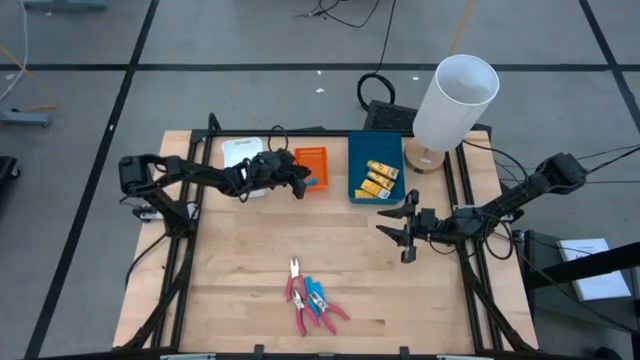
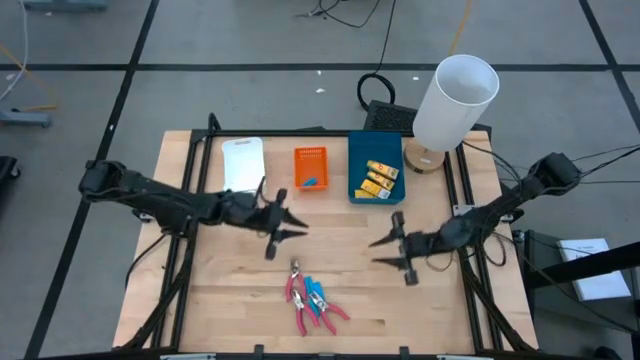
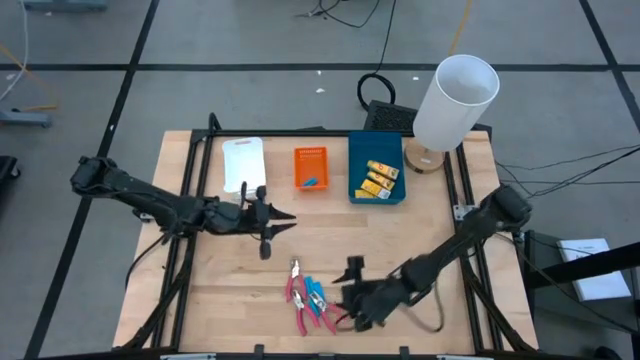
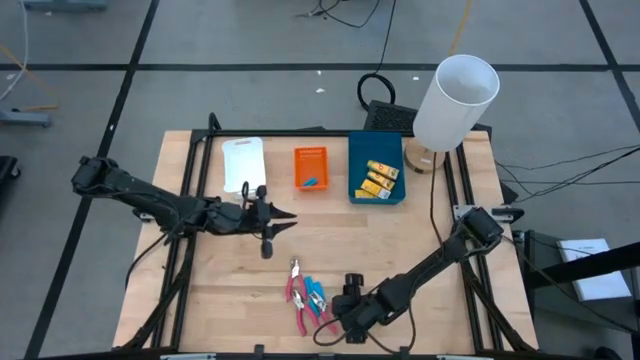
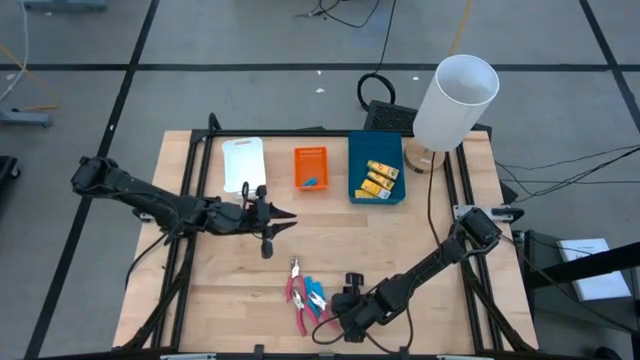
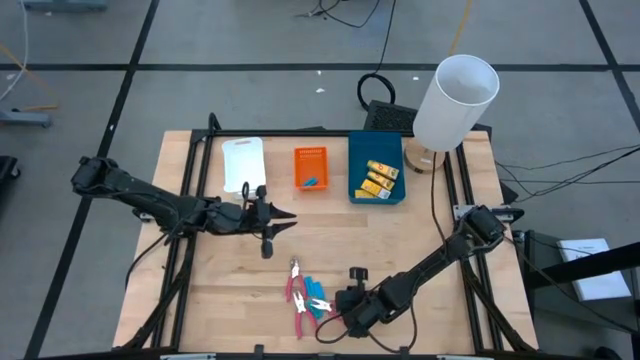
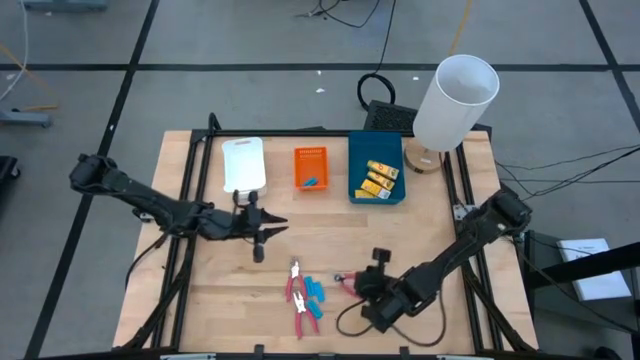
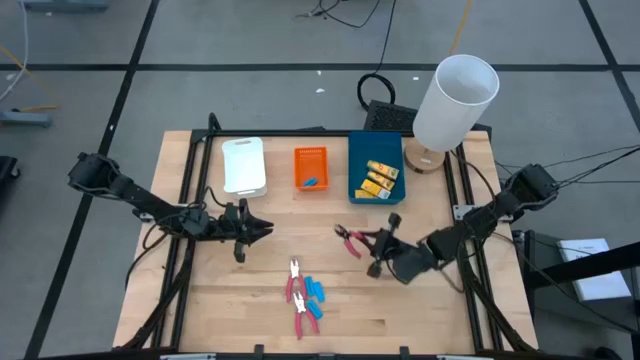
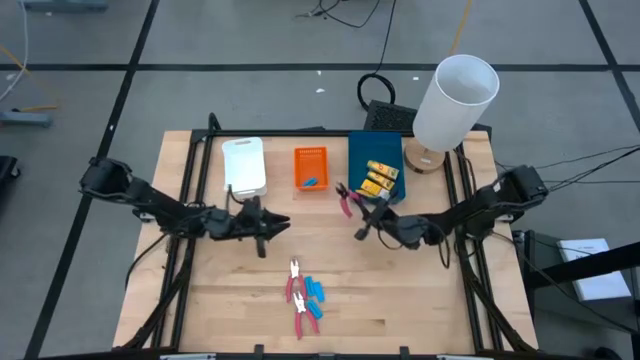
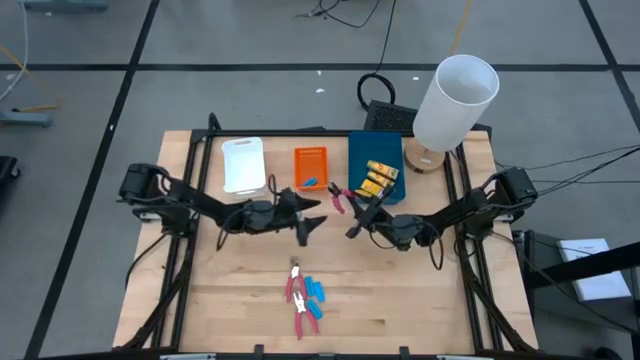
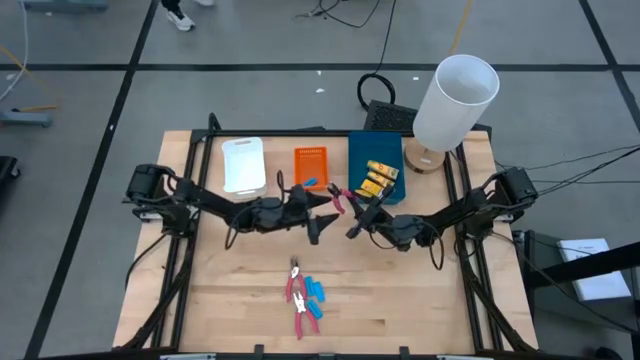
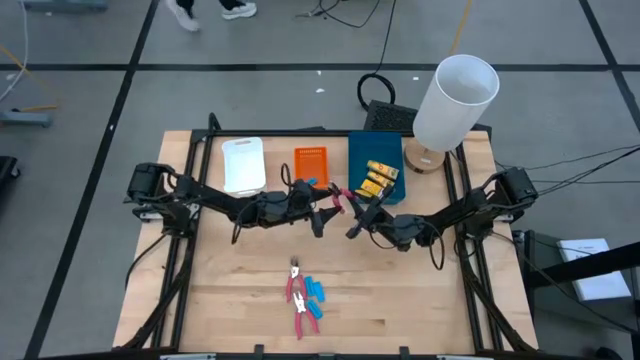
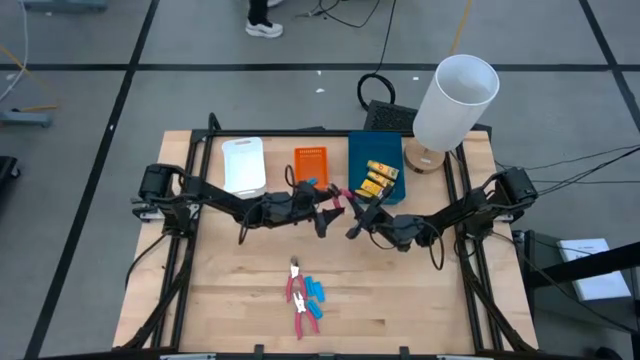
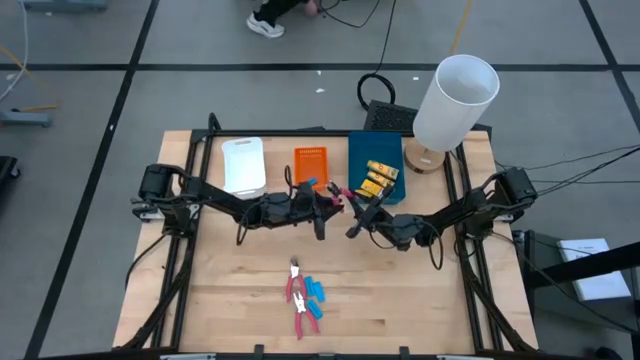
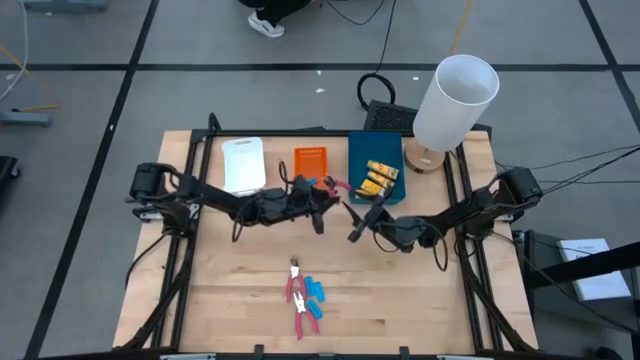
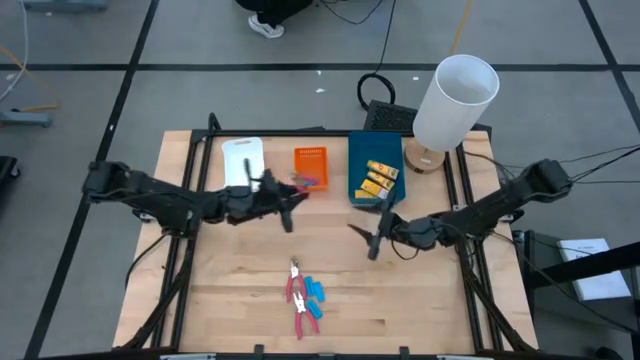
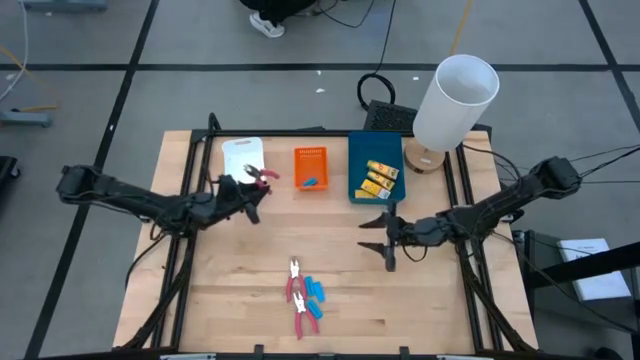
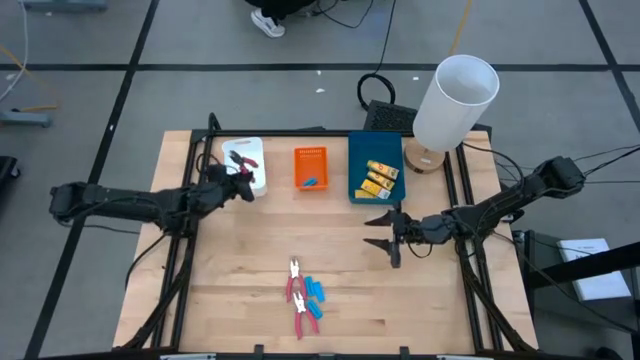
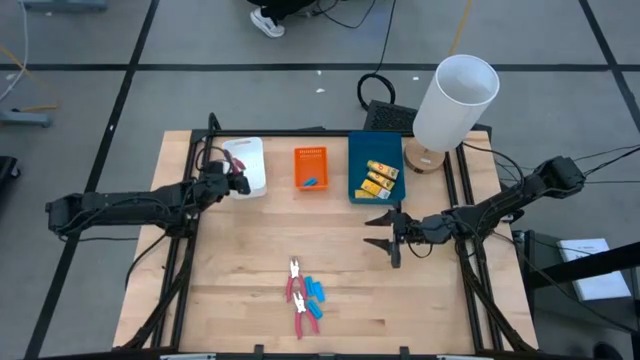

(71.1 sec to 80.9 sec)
Task: Pick & Place School Supplies
Put the ticket punch into the white bin

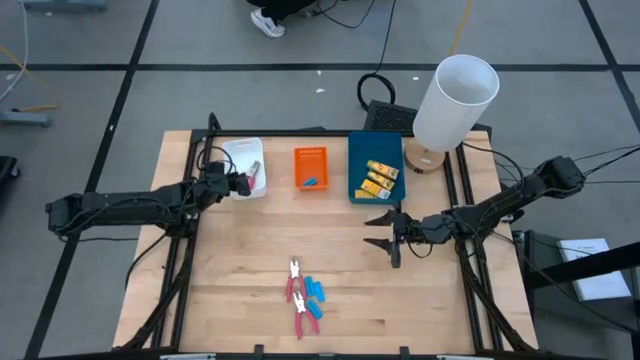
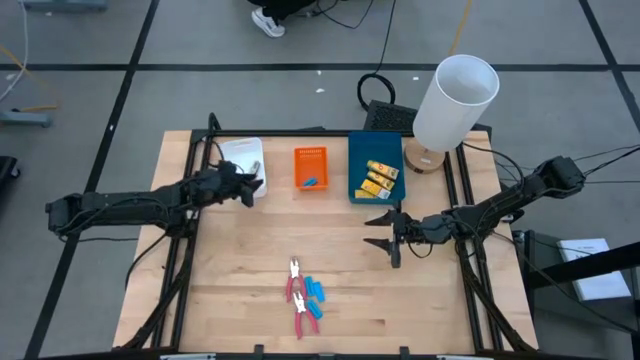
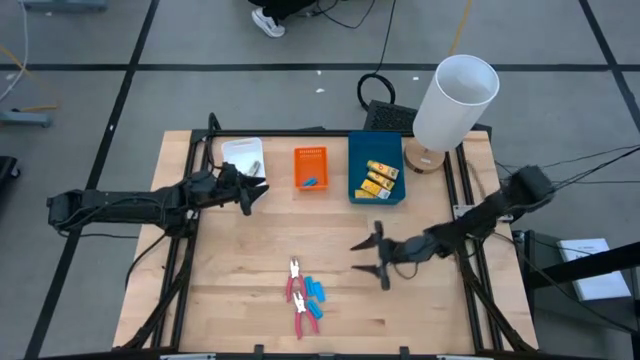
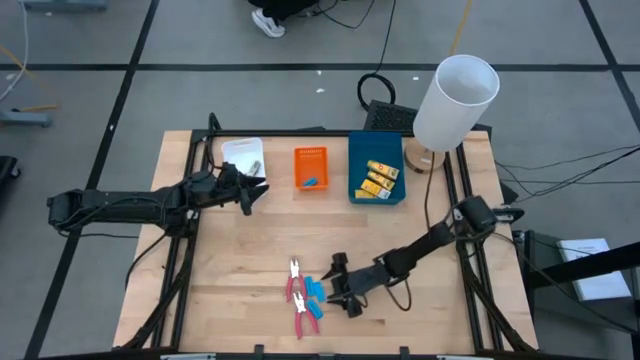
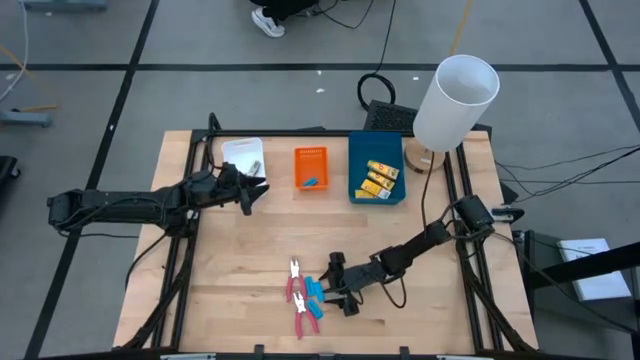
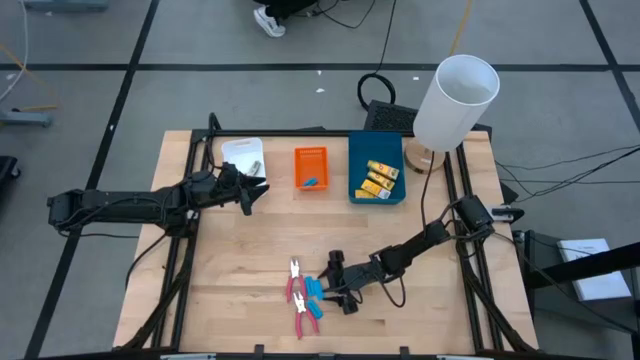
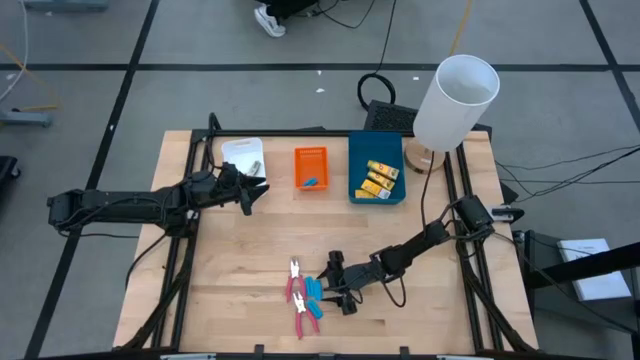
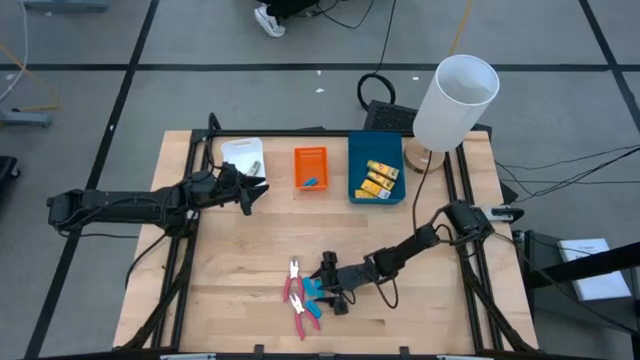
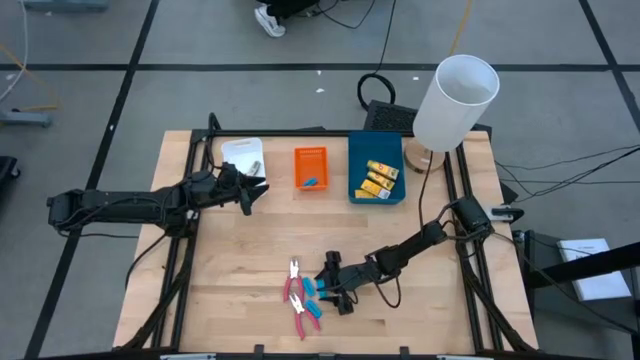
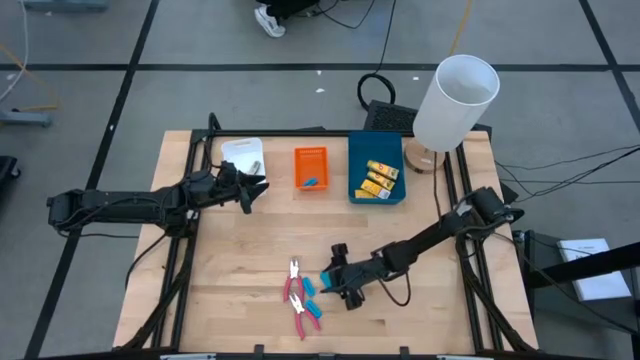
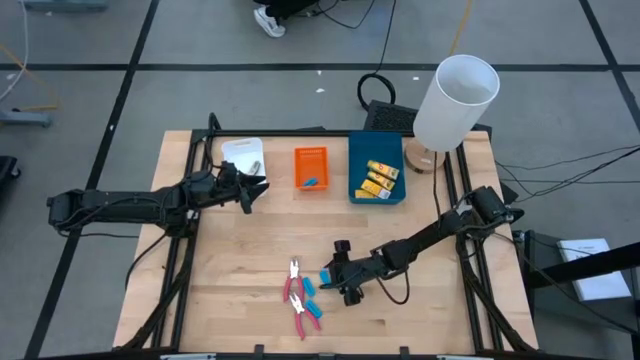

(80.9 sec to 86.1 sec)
Put the eraser into the orange bin

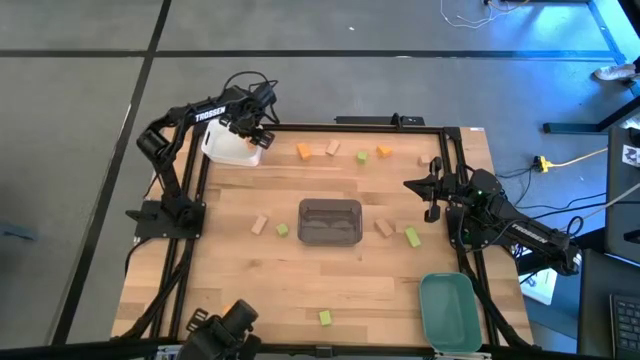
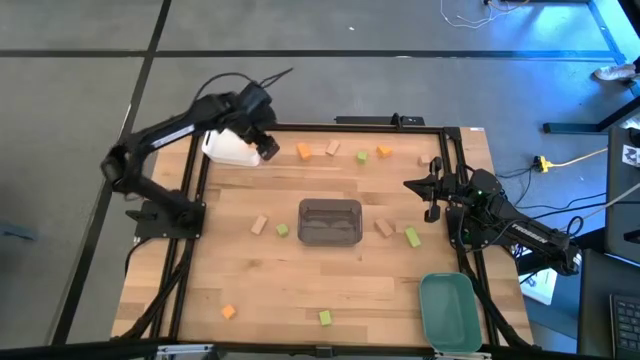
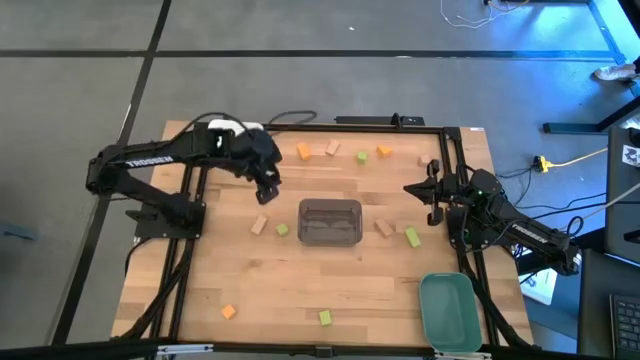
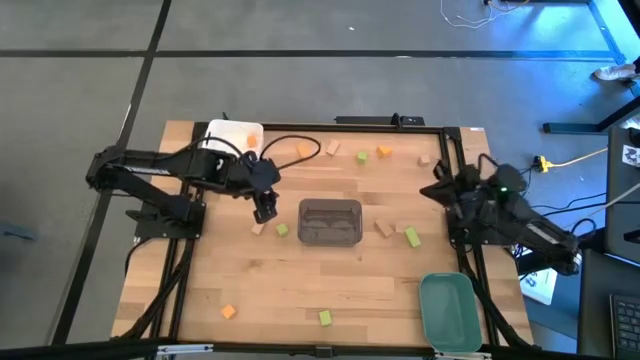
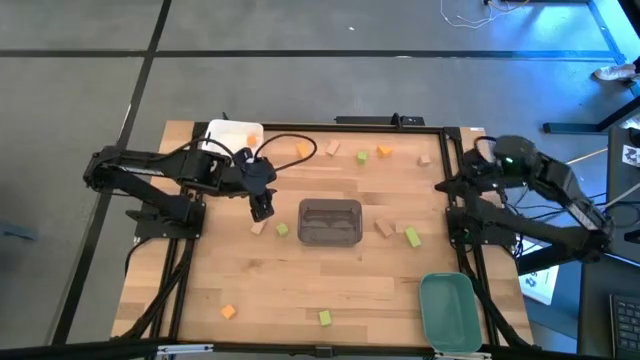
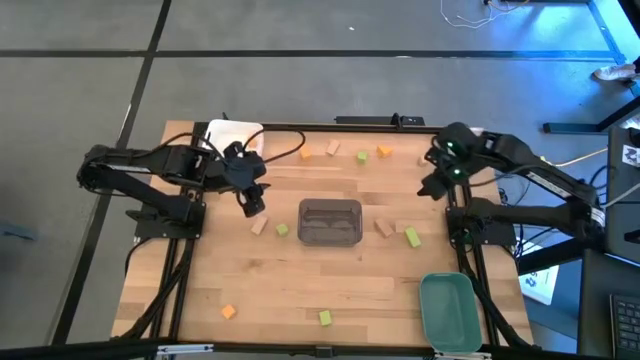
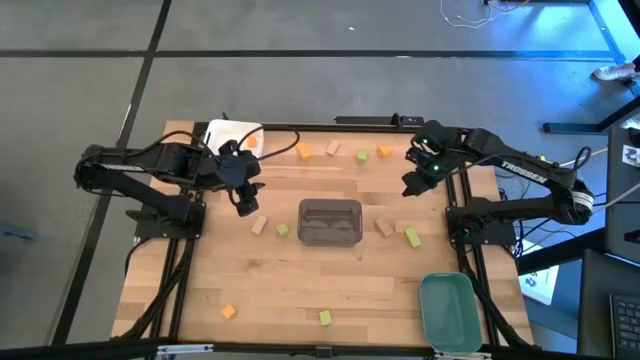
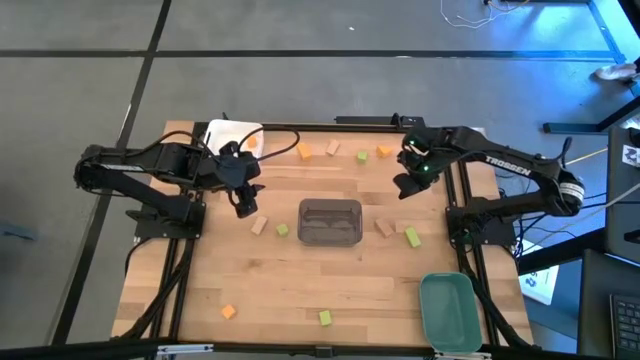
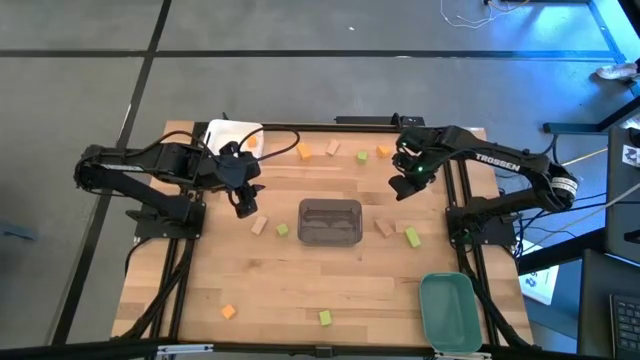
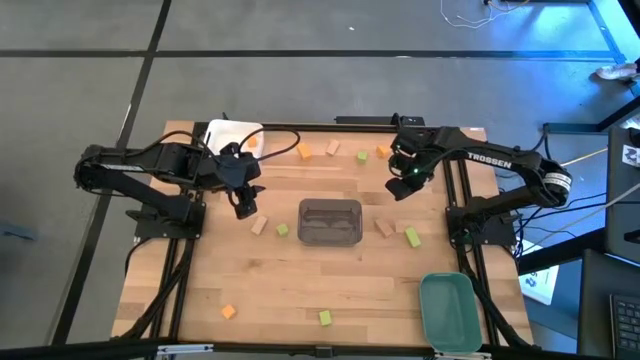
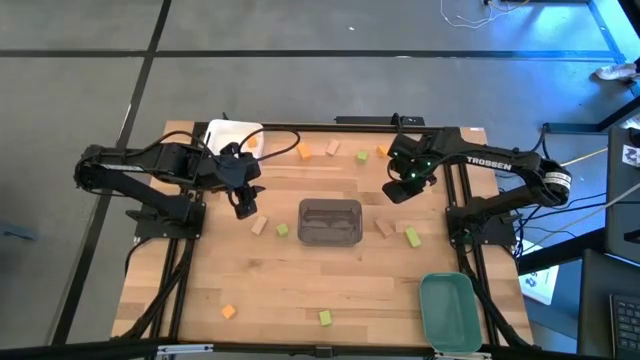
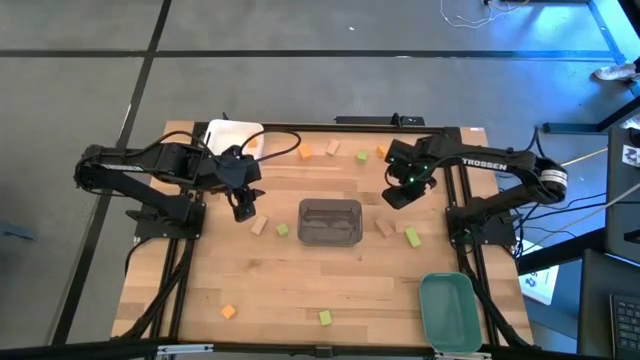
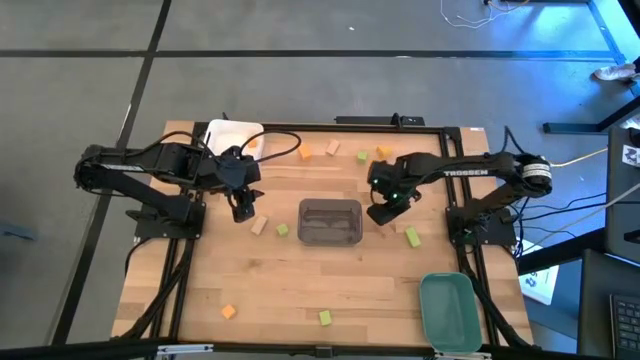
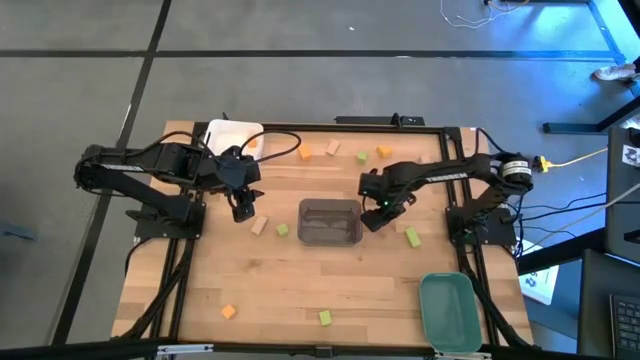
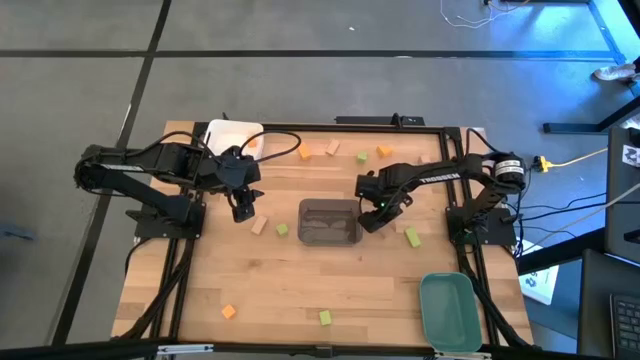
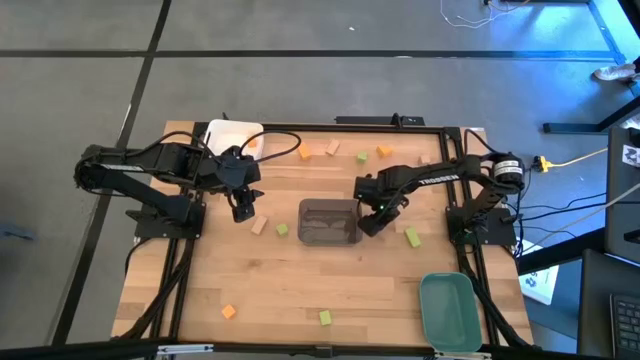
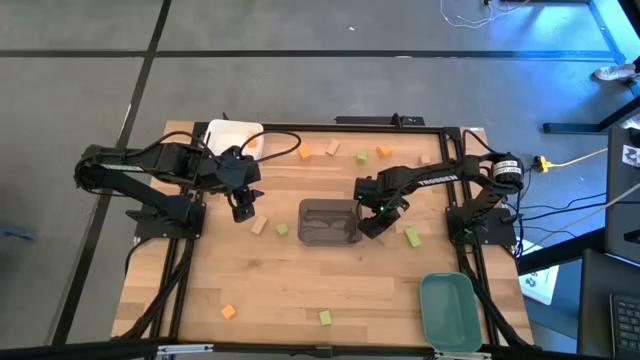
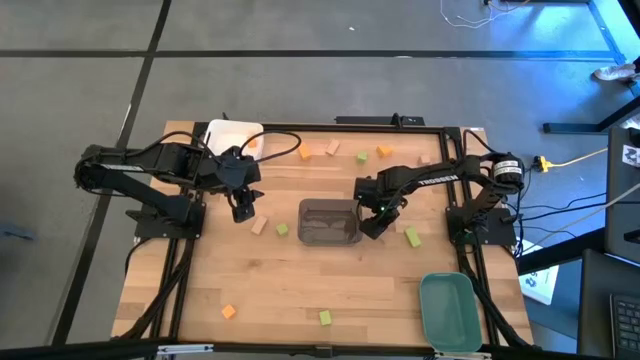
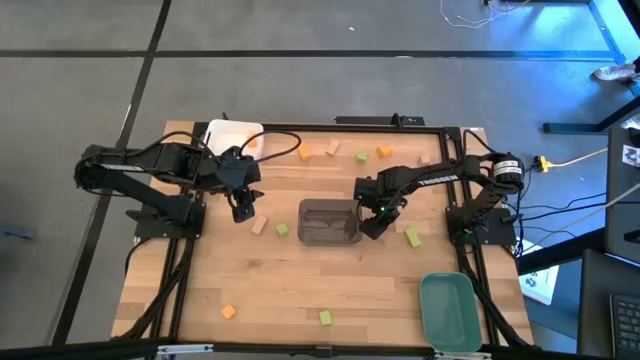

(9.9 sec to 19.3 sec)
Task: Sort & place blocks by color
Put the brown block into the black bin
